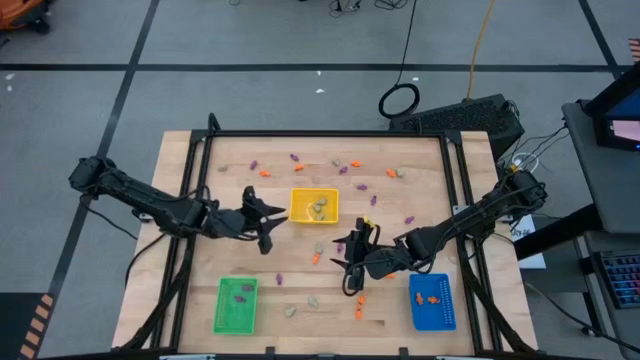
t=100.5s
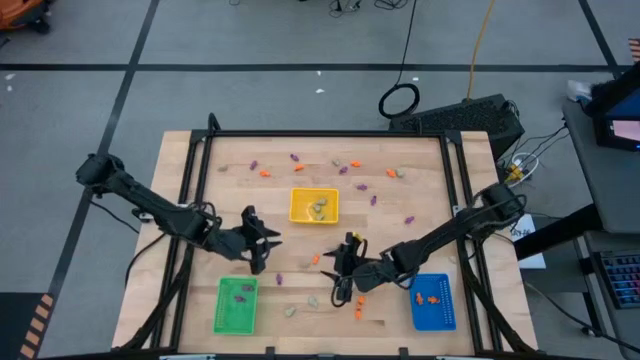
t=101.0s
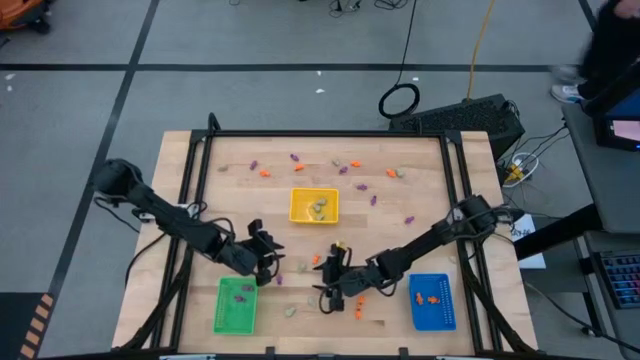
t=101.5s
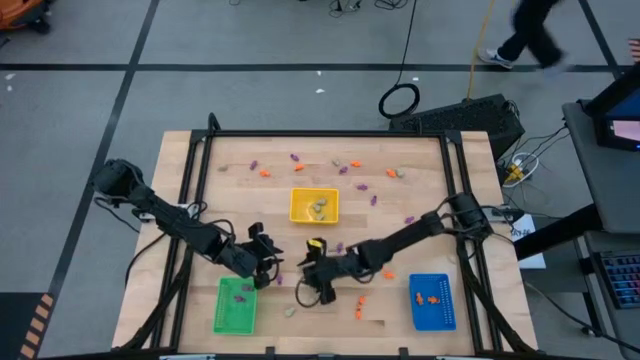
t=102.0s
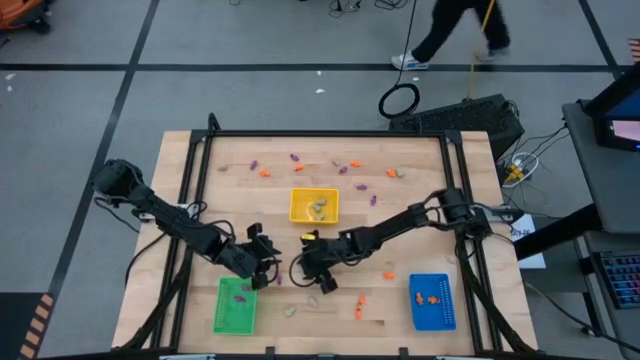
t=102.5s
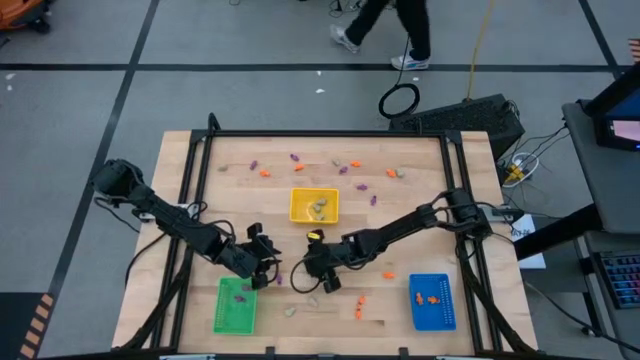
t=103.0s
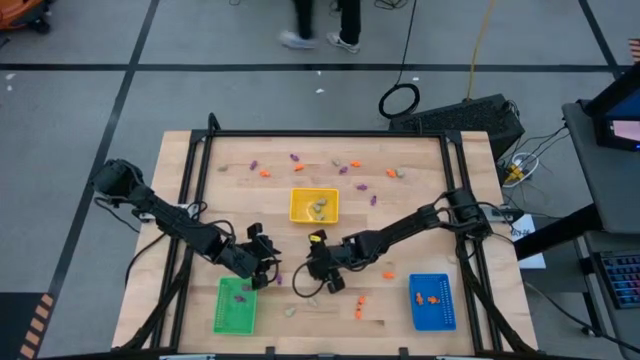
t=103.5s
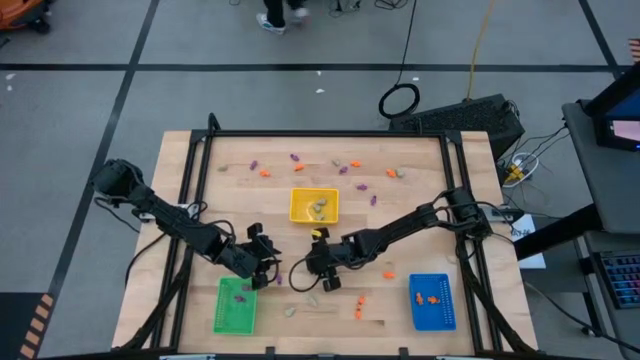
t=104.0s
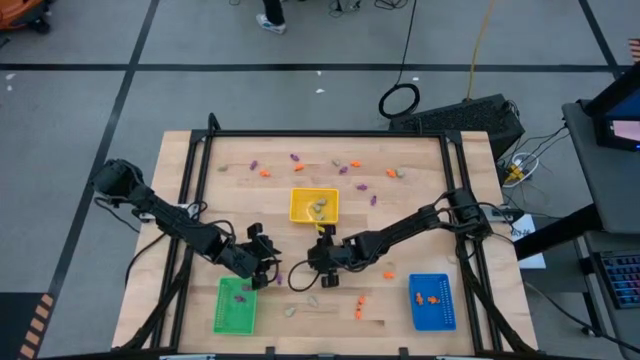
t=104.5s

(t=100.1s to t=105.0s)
Task: Sort Halloween decoration
Put the white skull toy in the yellow basket

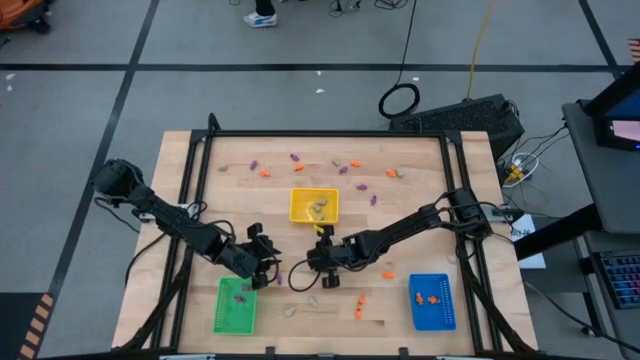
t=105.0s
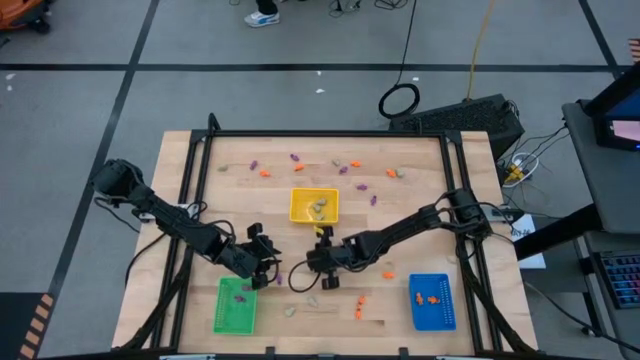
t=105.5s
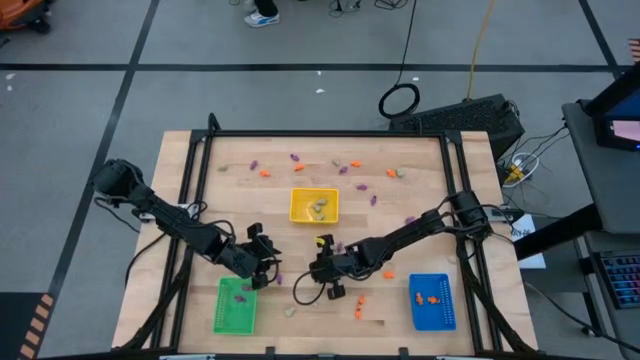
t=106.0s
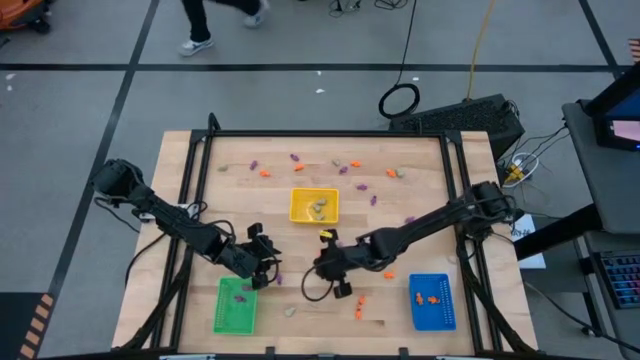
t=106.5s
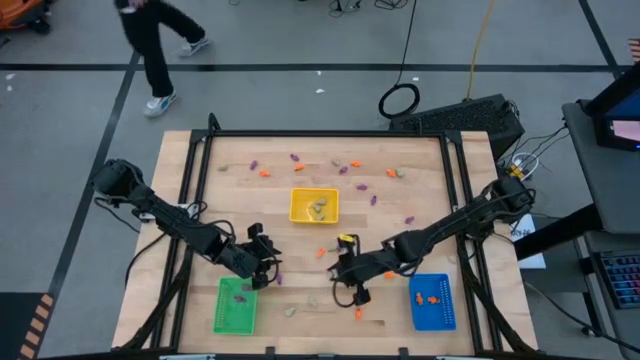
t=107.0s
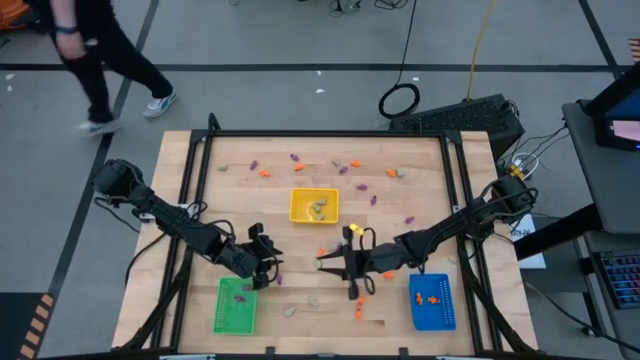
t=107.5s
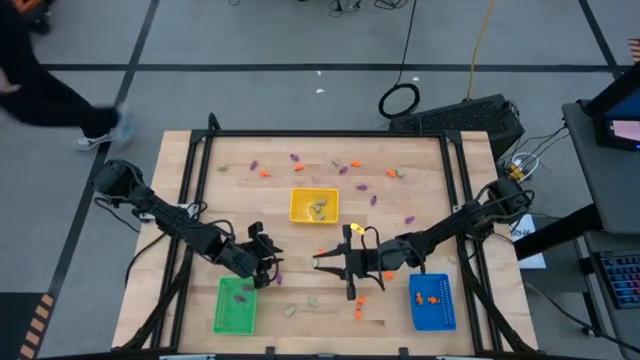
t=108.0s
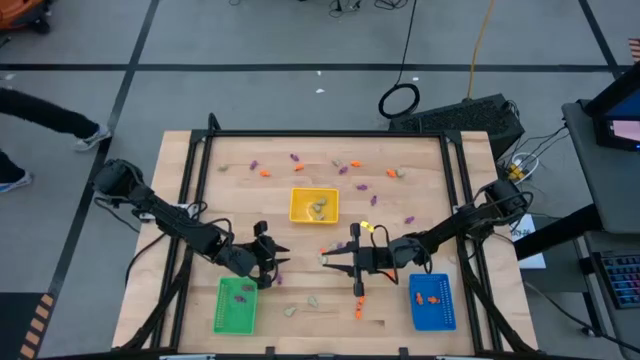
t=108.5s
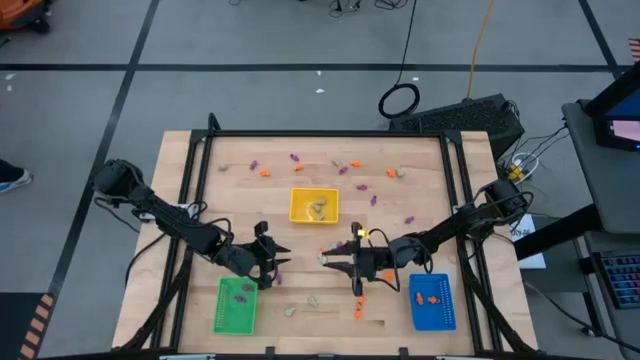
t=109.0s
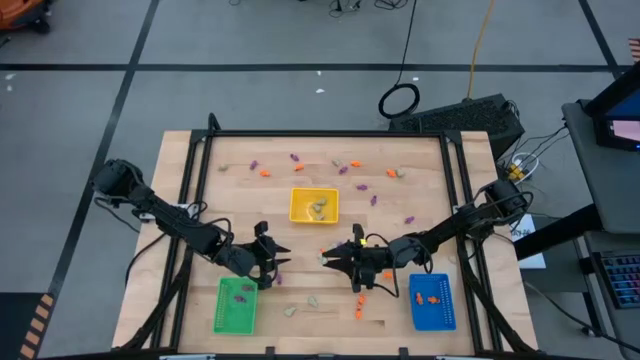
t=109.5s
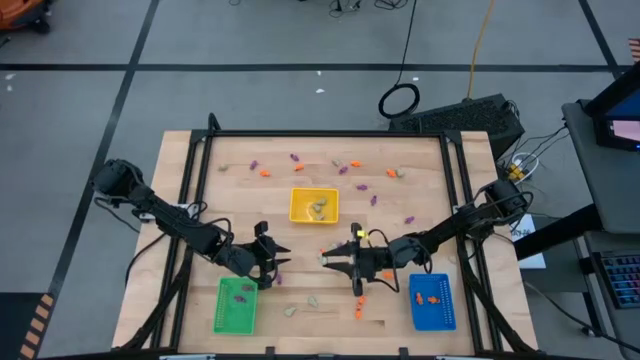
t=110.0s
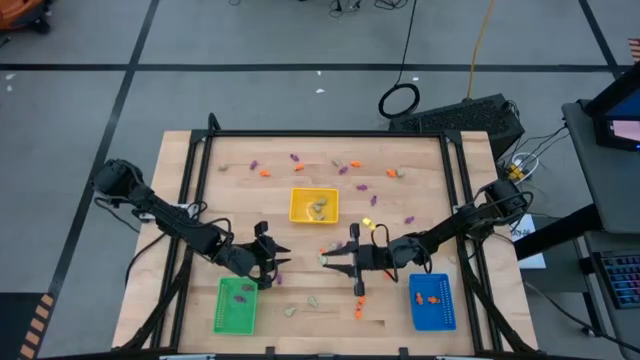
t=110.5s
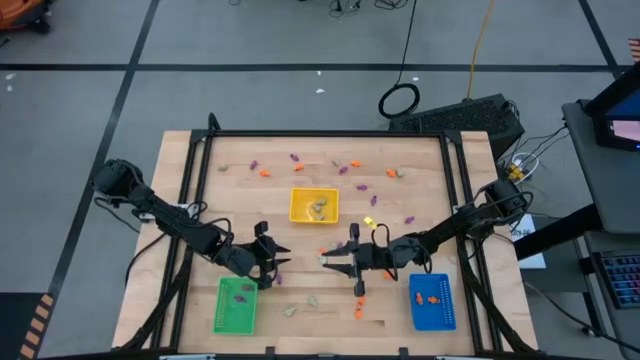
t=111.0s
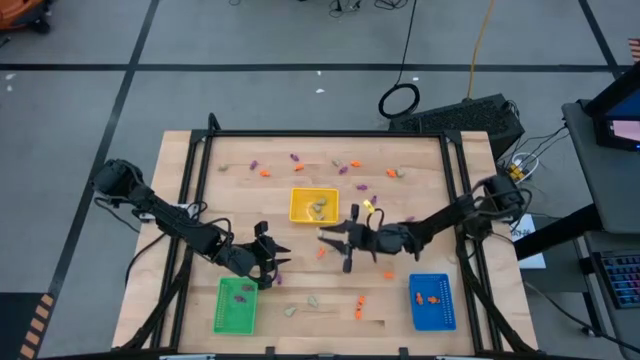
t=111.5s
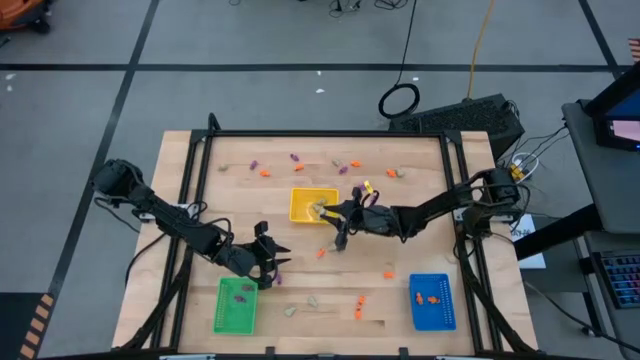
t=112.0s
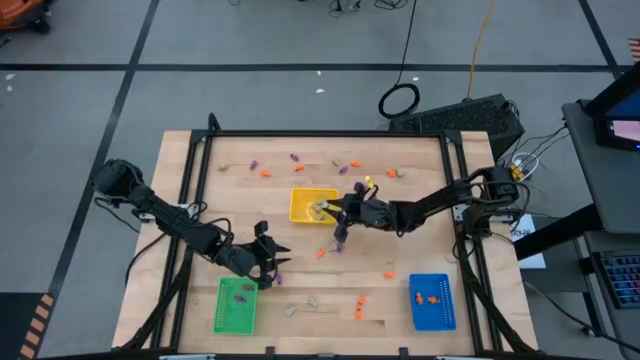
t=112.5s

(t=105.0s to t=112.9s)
Put the white skull toy in the yellow basket

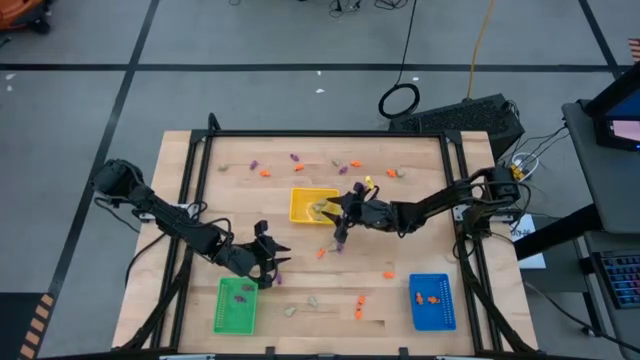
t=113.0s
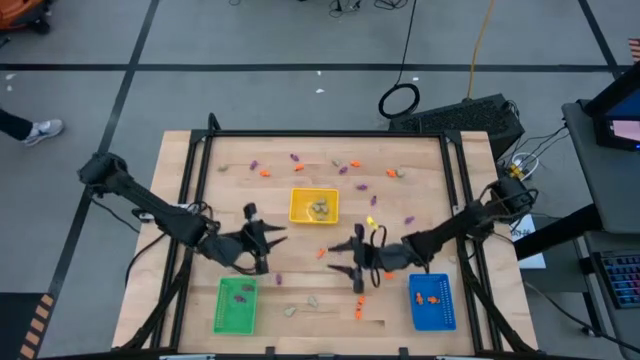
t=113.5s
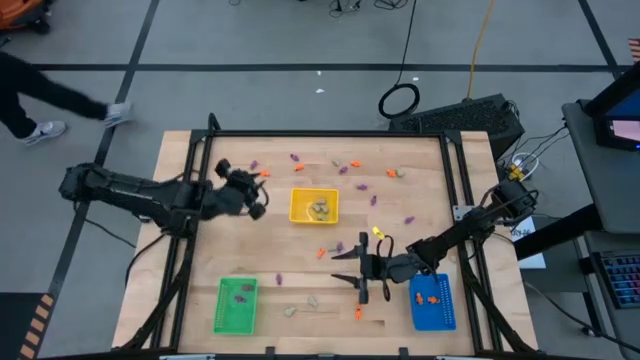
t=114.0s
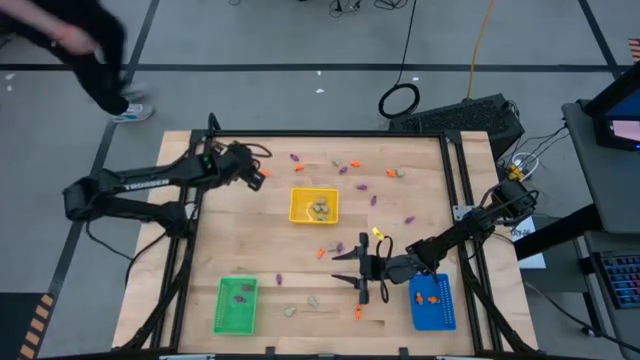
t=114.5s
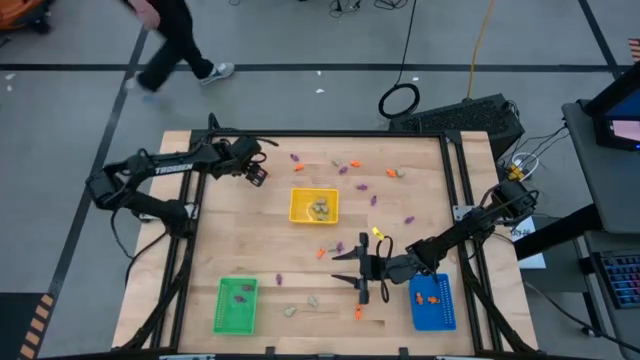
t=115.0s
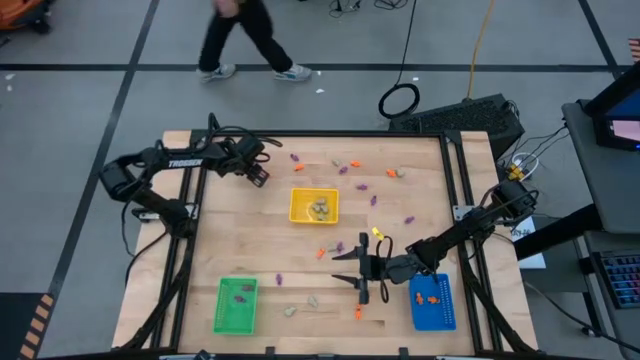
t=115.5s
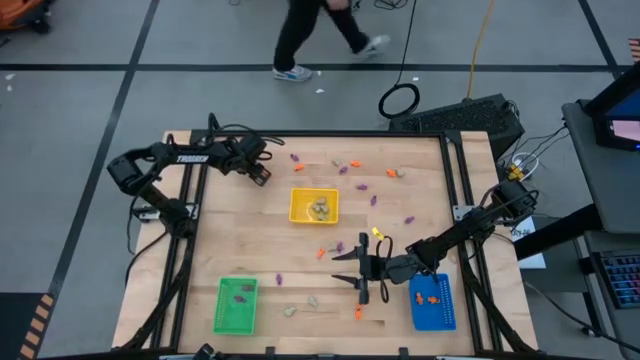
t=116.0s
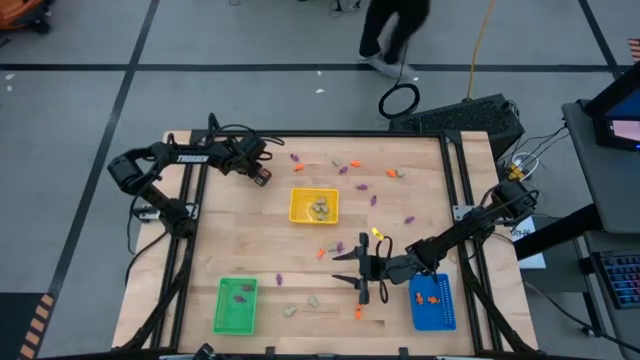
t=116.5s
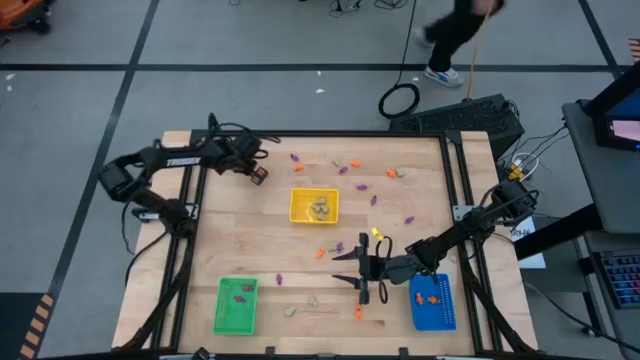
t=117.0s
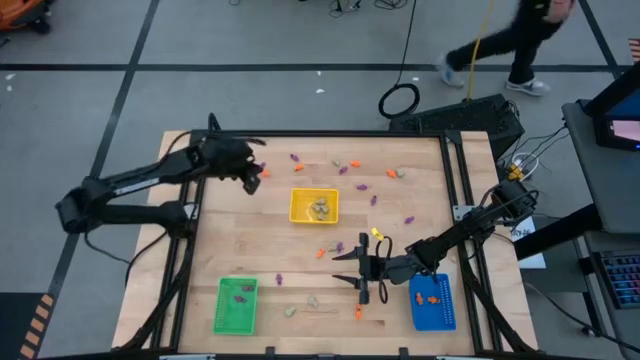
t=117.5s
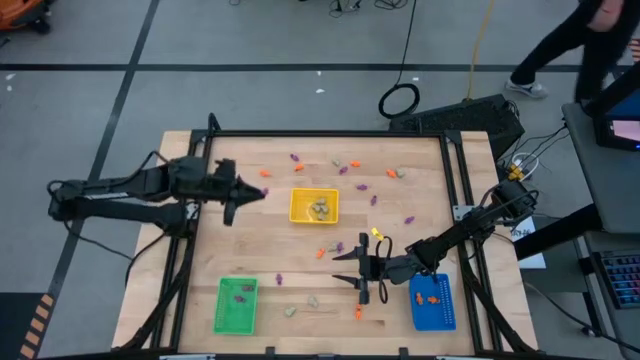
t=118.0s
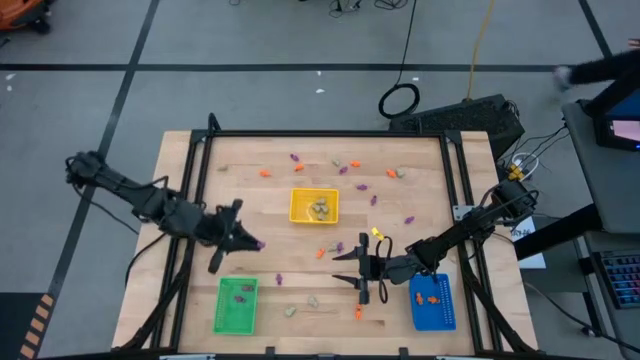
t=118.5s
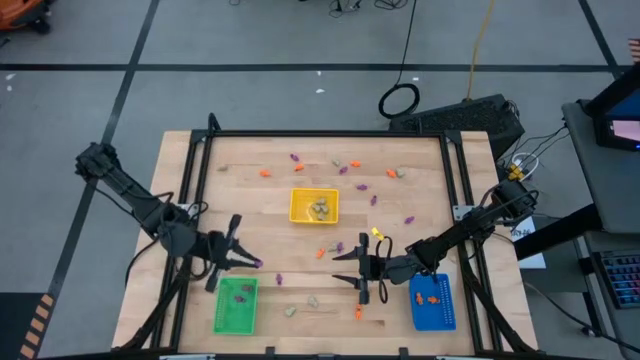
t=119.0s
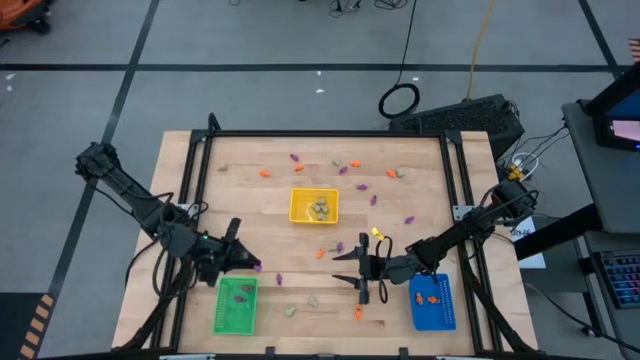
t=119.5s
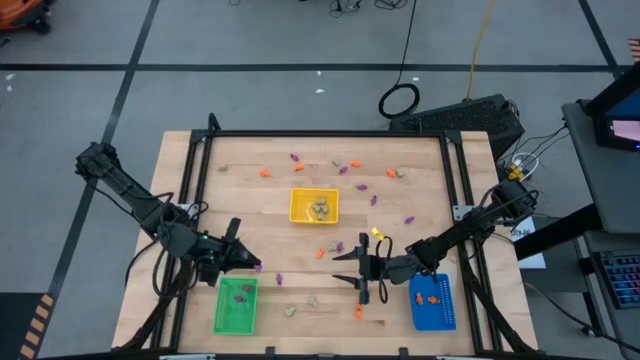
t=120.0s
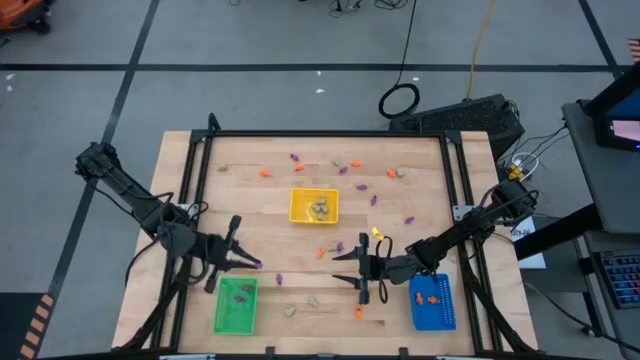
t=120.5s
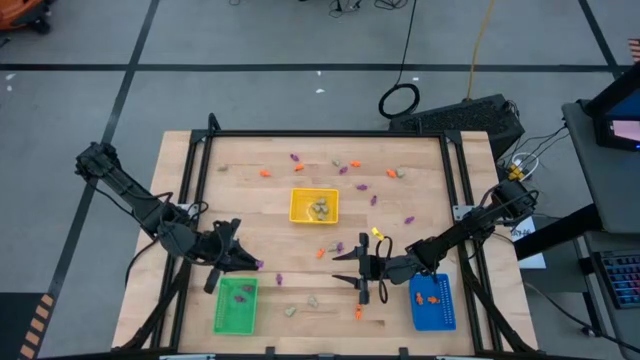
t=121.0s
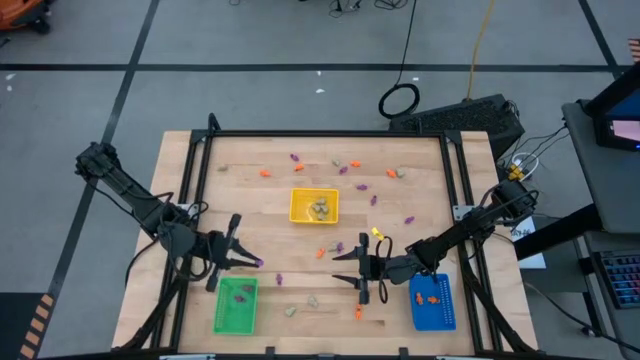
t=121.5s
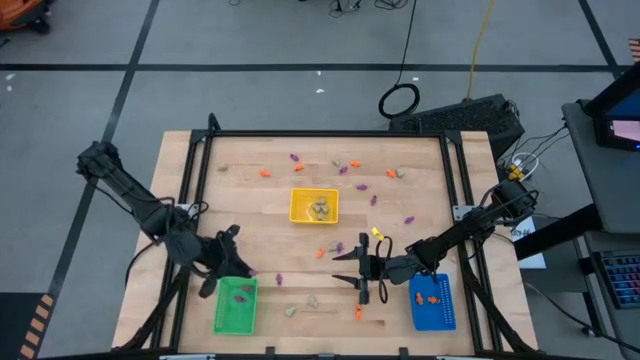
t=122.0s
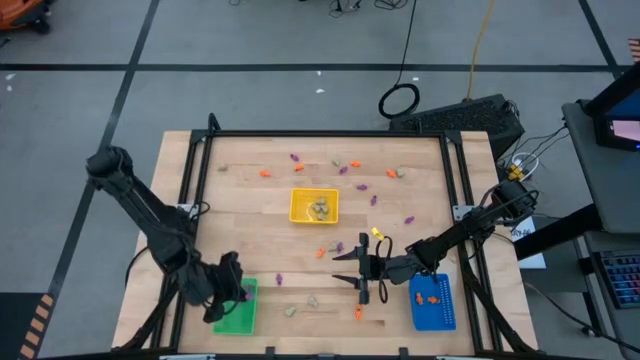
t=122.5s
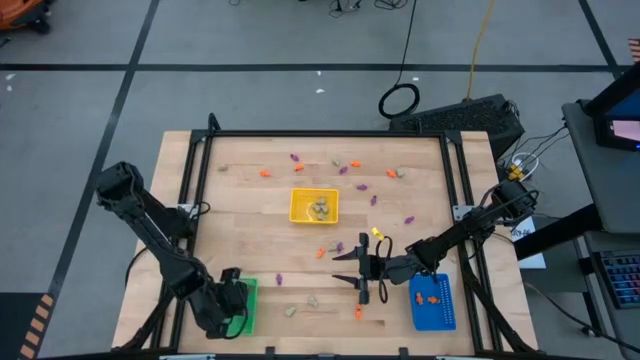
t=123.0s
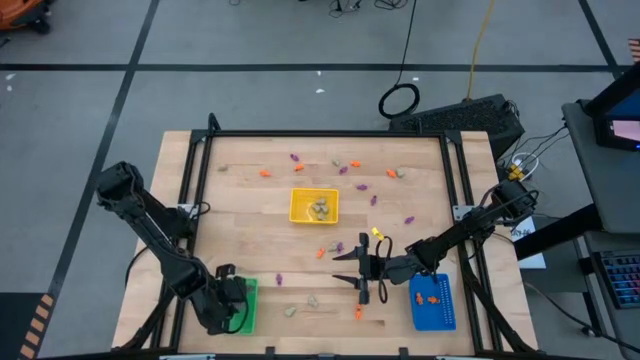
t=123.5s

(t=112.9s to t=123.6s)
Put the purple skeleton toy in the green basket
